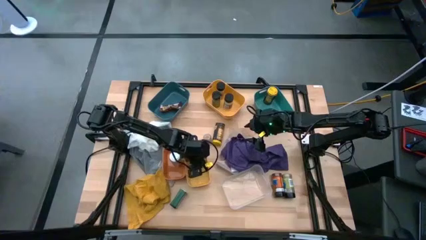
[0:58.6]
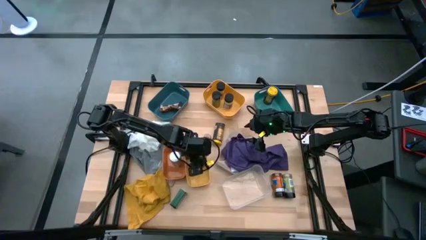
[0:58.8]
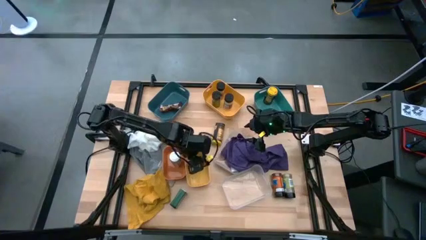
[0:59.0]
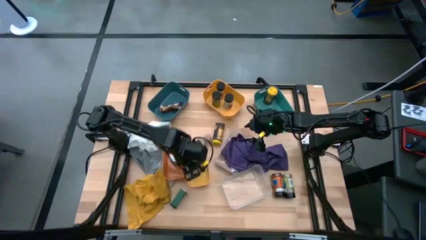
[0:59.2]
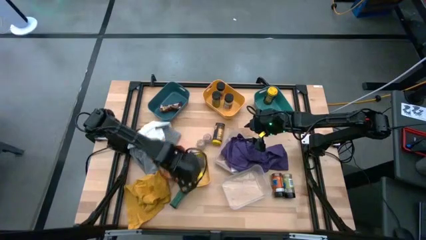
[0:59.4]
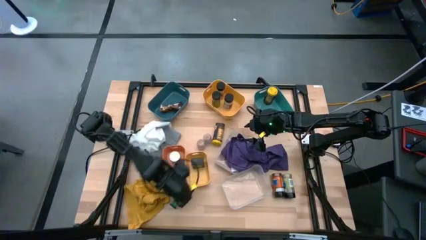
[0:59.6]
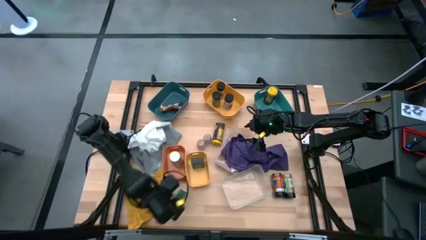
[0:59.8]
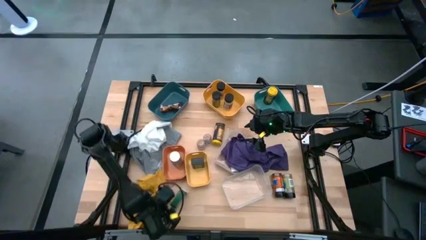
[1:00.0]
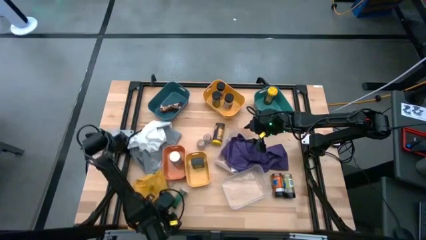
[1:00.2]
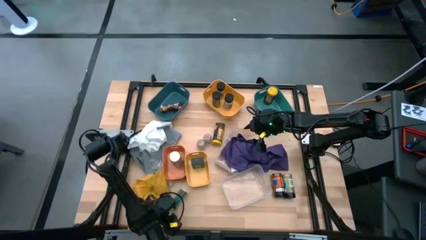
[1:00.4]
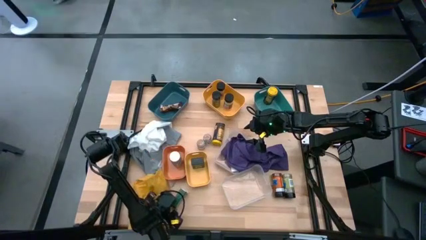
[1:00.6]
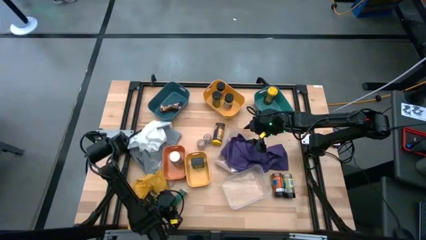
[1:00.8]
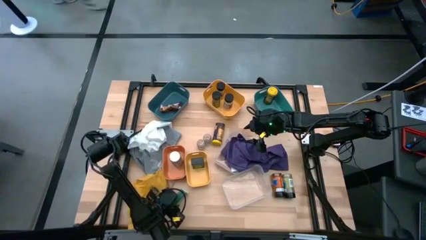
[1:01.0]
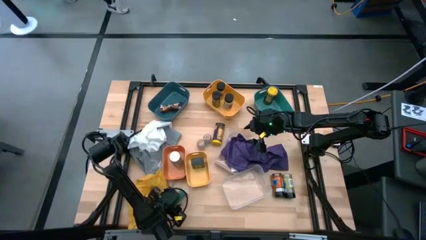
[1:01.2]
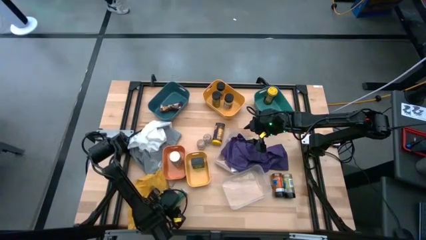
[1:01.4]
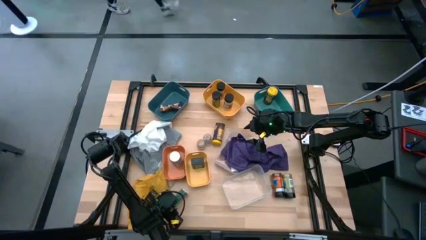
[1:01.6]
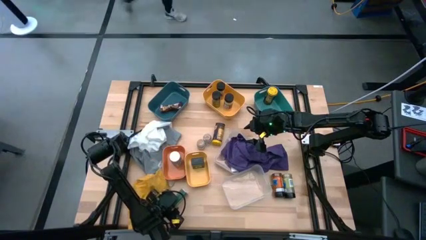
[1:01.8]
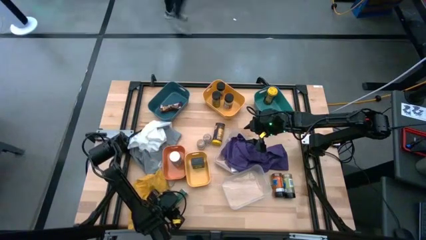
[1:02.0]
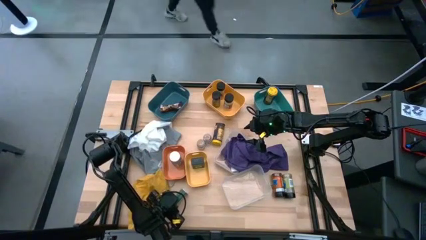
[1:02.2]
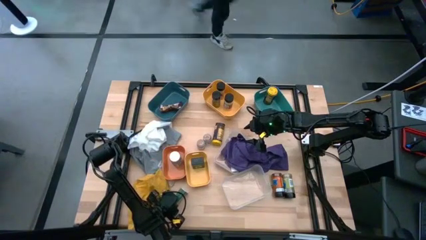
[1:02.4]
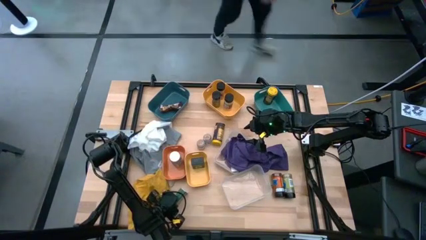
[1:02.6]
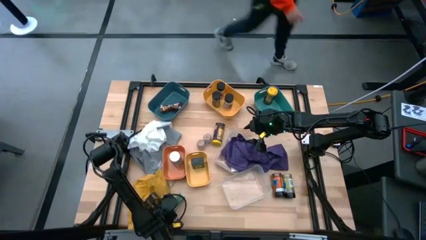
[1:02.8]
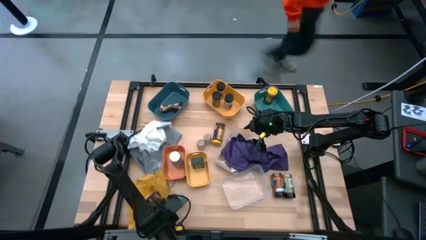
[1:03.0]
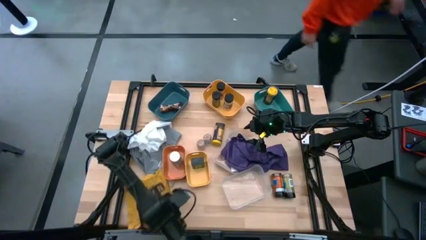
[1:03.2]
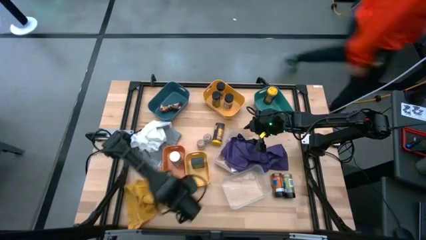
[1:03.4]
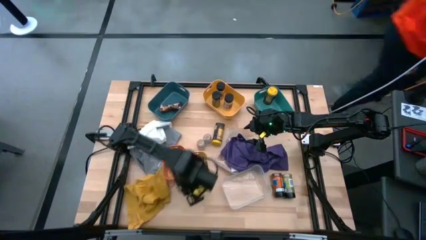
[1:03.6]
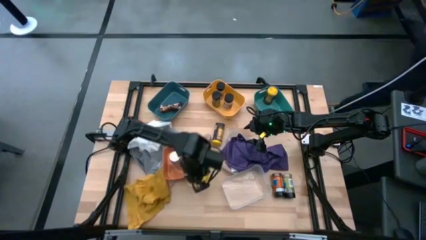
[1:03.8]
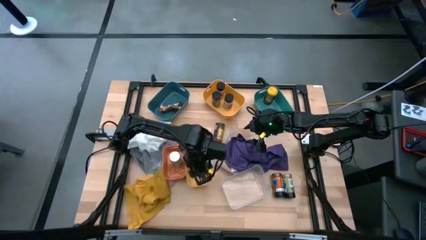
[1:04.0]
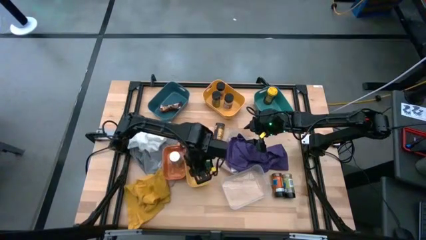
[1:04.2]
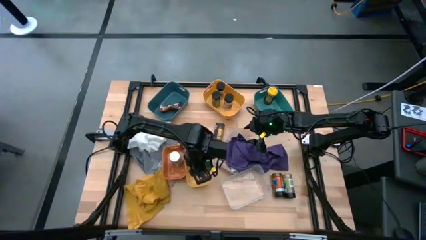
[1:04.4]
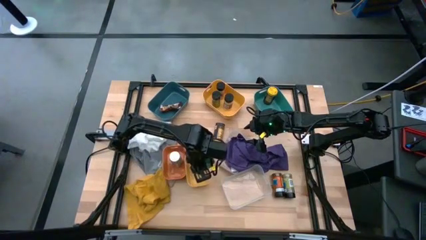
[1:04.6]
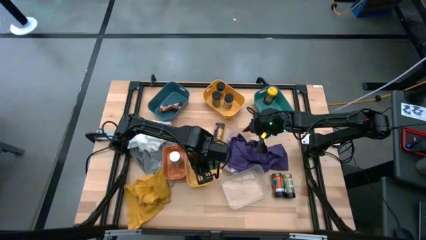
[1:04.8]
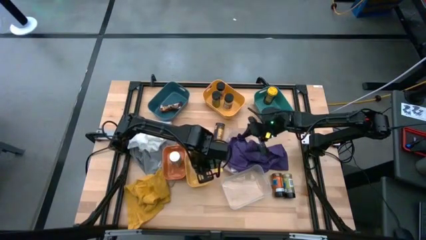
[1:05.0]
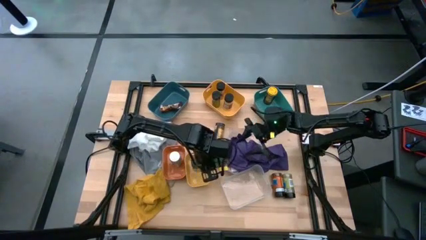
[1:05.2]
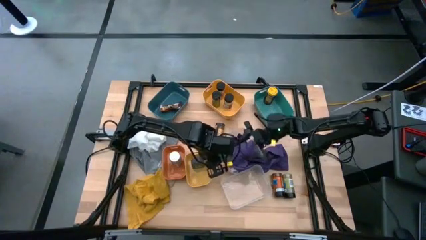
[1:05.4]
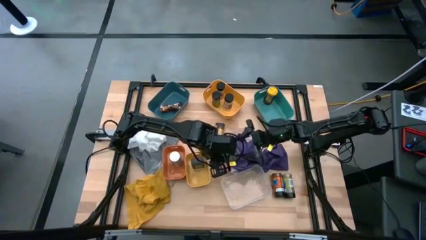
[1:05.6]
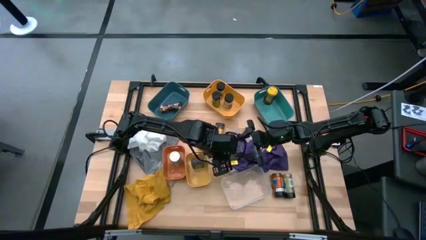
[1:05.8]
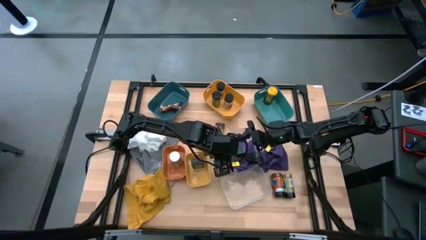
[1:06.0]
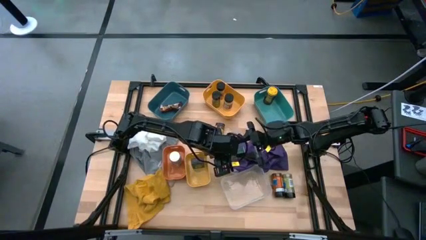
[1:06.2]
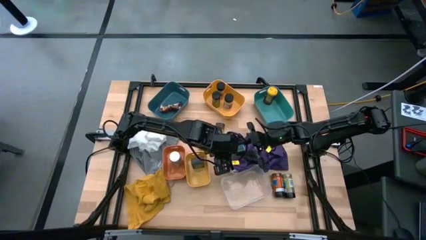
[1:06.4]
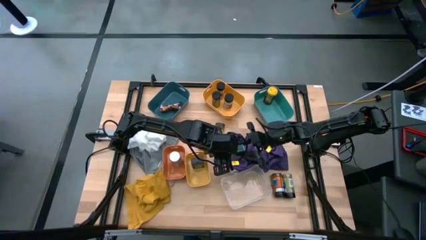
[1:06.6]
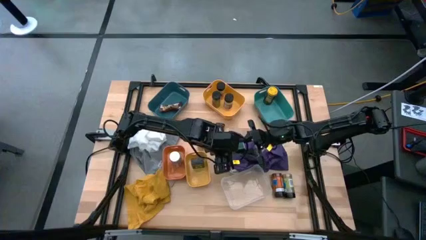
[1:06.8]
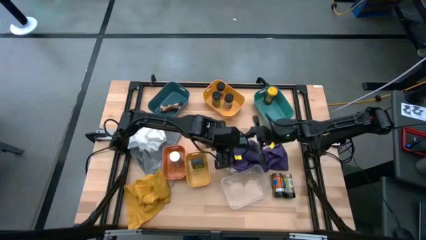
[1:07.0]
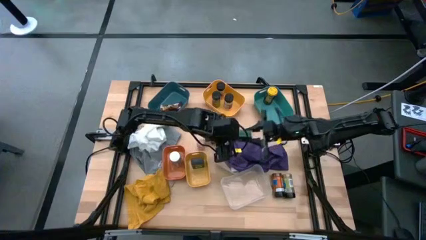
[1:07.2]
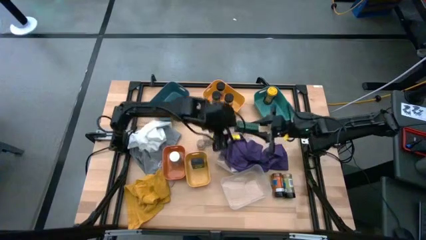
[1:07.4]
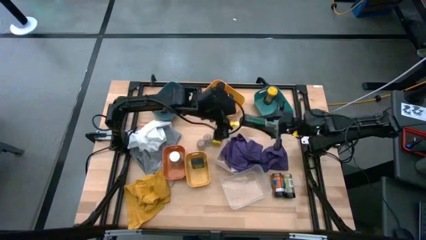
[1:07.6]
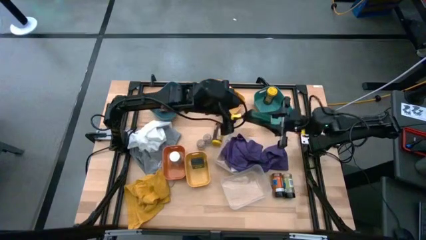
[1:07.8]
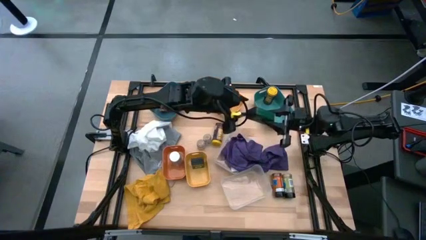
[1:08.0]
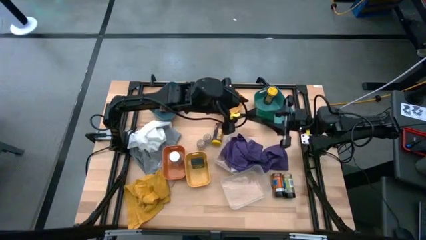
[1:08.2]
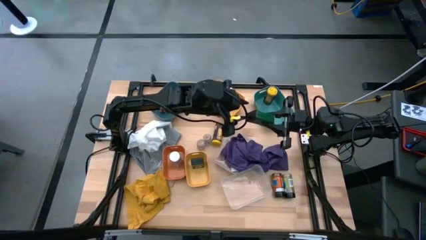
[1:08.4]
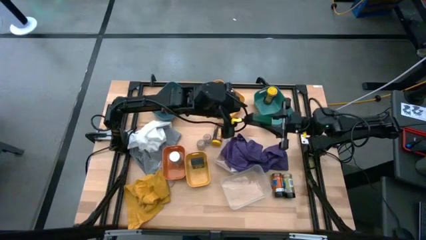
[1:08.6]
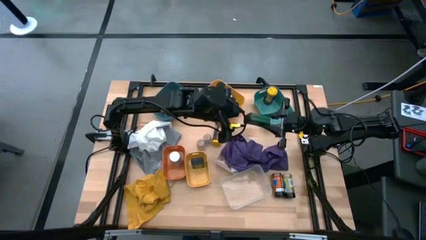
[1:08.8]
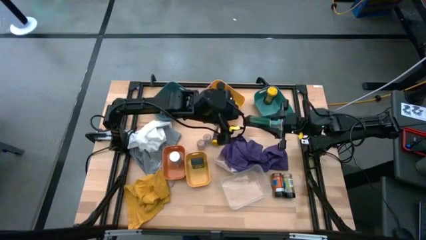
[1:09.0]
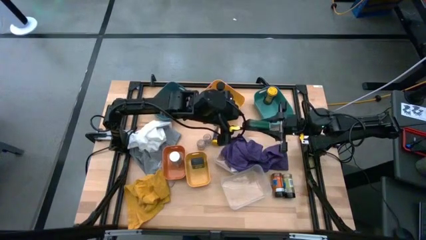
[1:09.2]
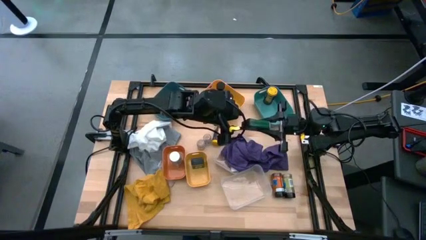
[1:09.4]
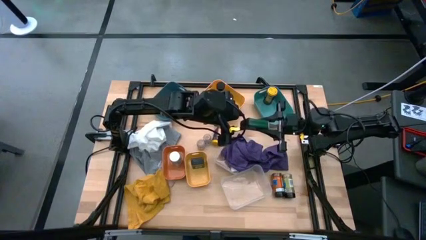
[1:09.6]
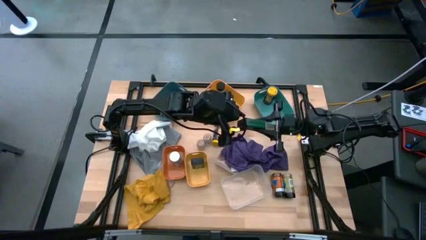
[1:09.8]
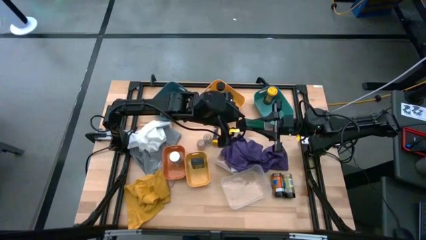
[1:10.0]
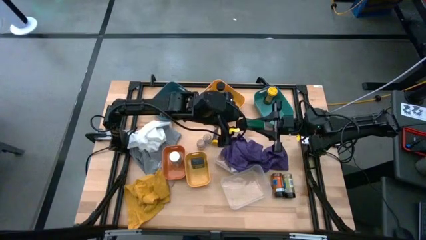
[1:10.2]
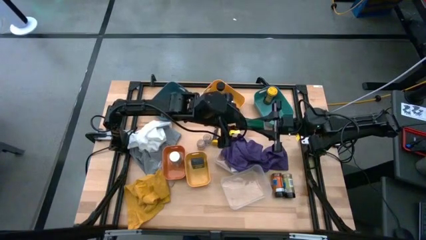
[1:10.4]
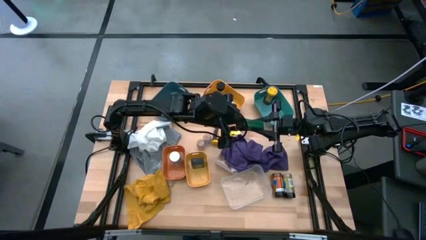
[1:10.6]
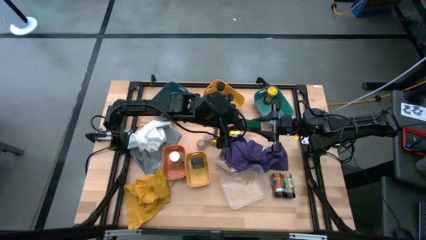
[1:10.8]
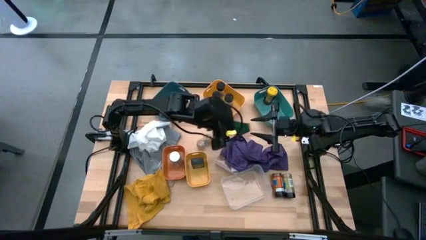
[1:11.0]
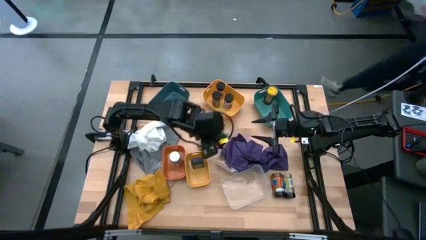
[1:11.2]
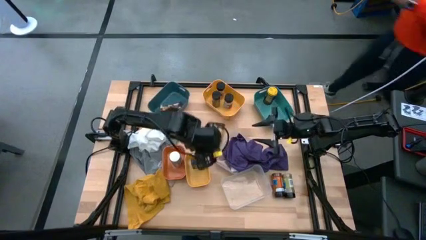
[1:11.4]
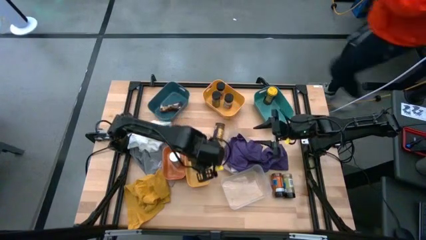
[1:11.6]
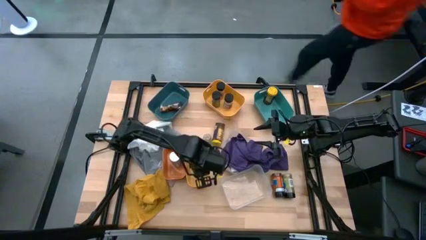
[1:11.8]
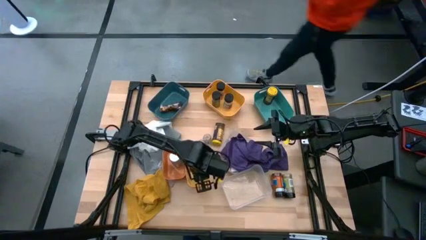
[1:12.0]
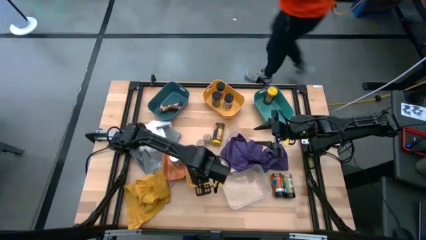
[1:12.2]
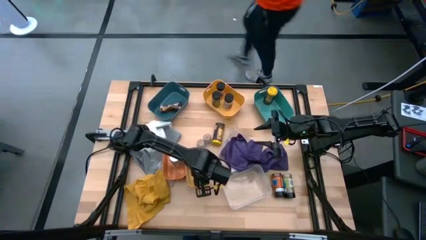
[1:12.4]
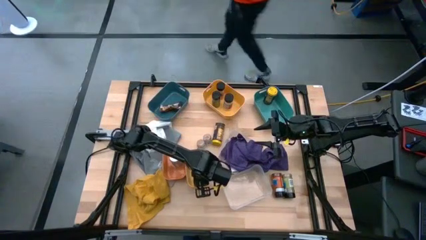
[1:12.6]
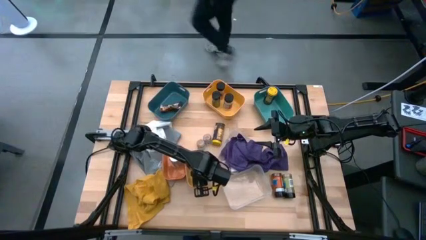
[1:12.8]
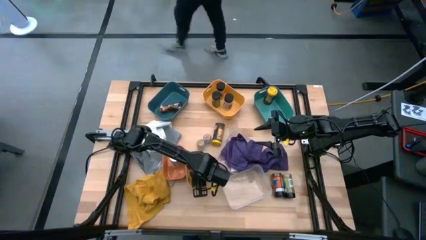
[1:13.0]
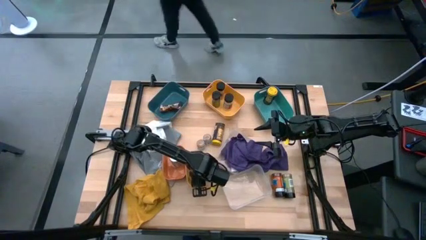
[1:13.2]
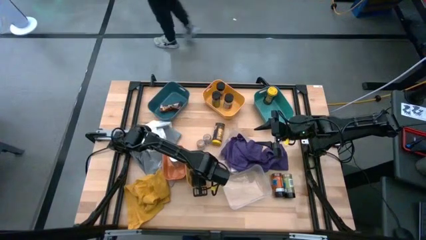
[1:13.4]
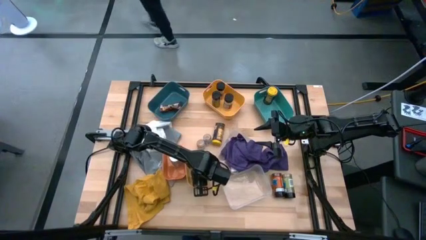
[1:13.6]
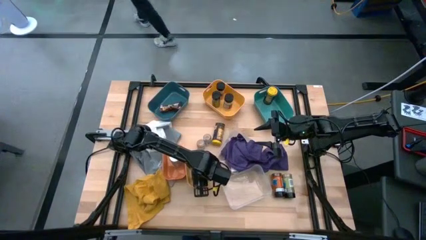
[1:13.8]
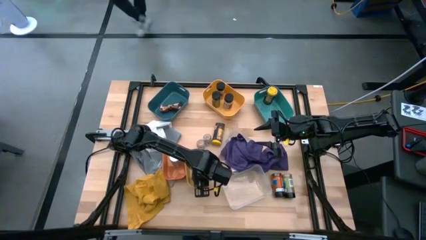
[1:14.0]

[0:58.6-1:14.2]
Task: Sort spices by type
Put the black spice can into the small yellow bin
